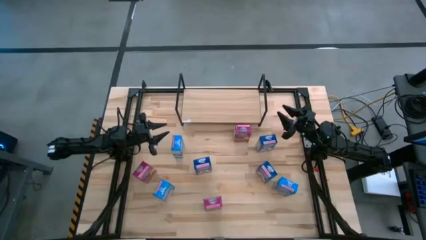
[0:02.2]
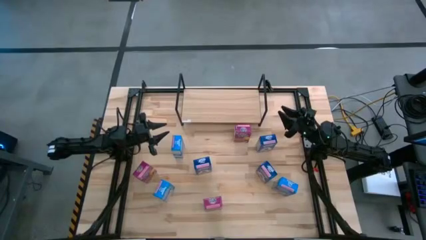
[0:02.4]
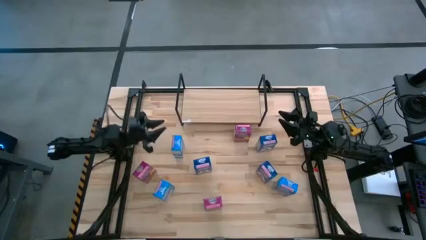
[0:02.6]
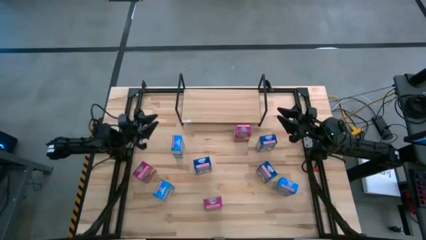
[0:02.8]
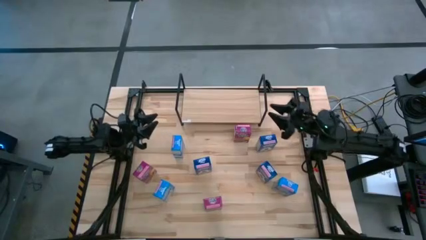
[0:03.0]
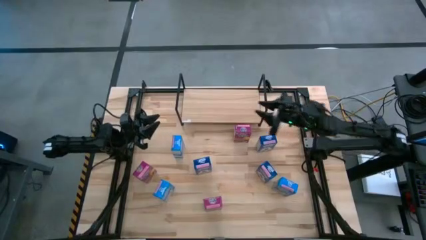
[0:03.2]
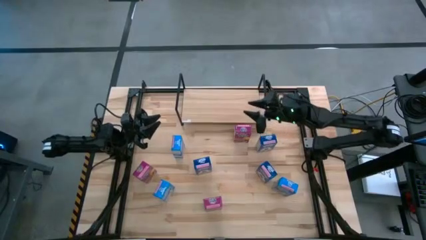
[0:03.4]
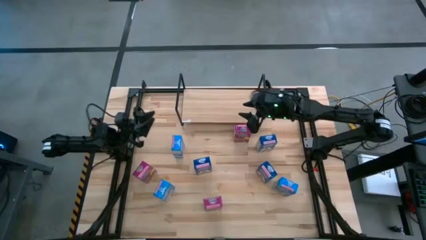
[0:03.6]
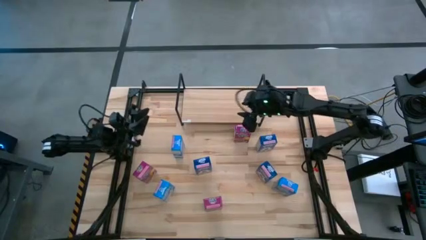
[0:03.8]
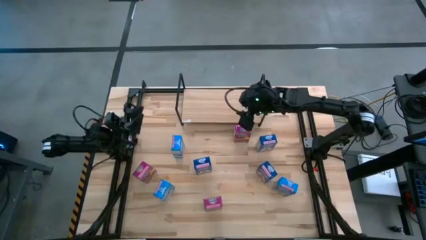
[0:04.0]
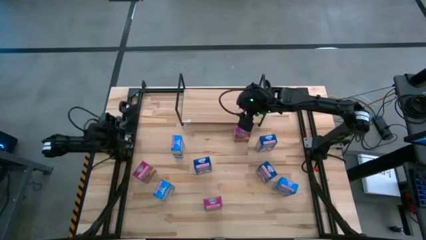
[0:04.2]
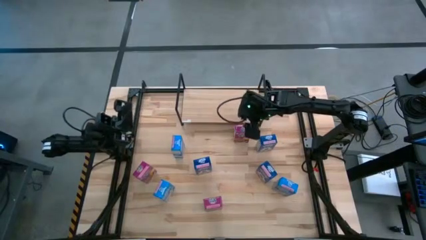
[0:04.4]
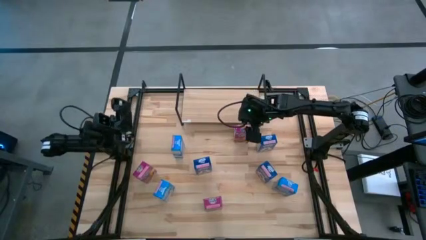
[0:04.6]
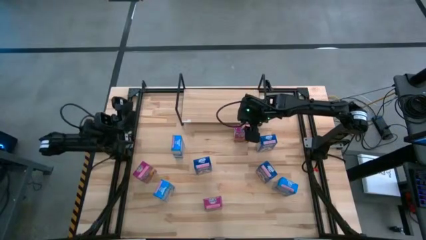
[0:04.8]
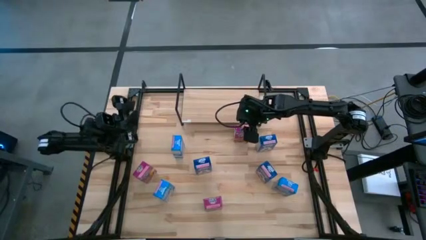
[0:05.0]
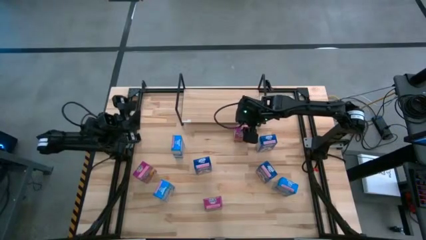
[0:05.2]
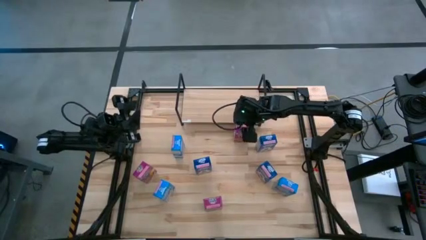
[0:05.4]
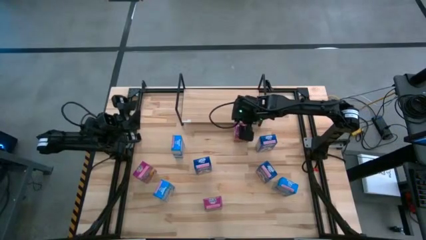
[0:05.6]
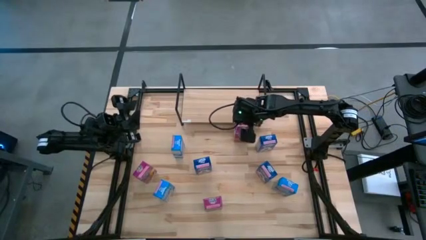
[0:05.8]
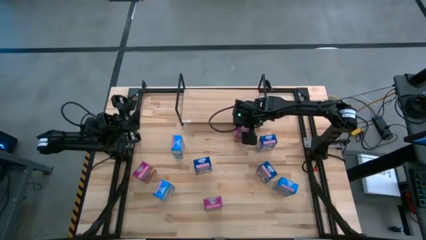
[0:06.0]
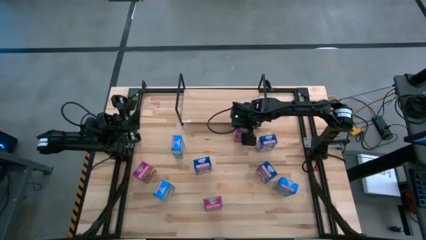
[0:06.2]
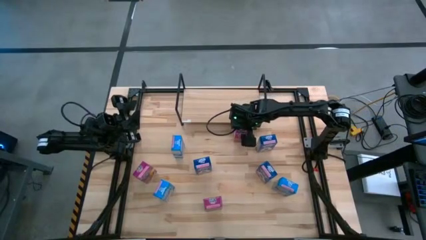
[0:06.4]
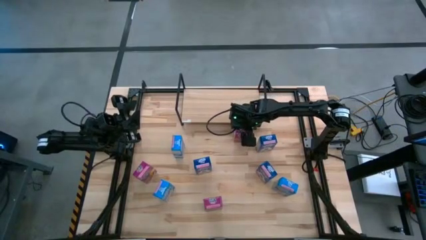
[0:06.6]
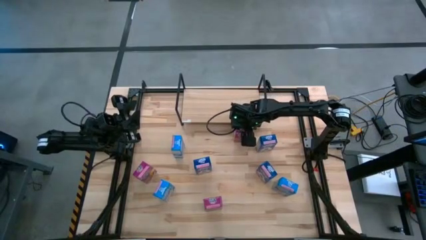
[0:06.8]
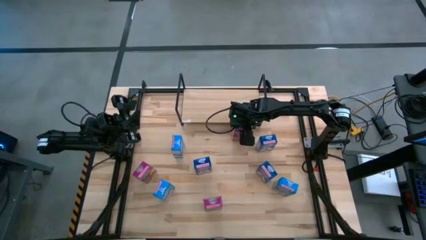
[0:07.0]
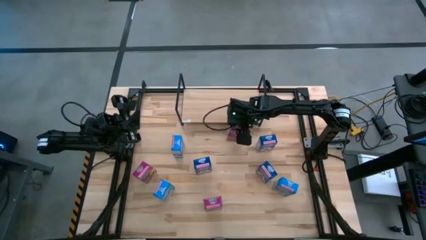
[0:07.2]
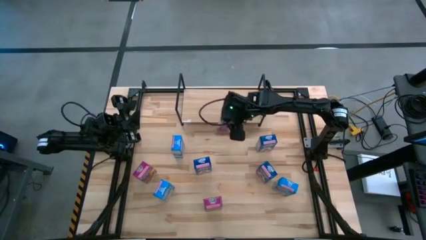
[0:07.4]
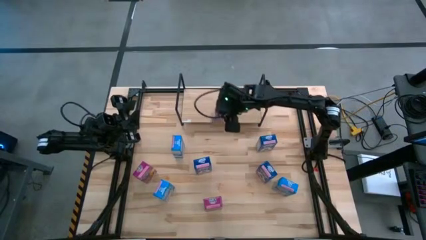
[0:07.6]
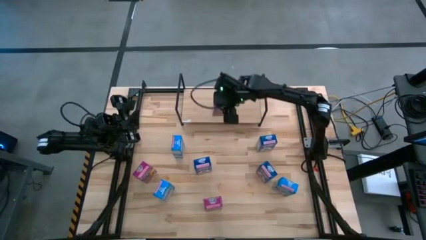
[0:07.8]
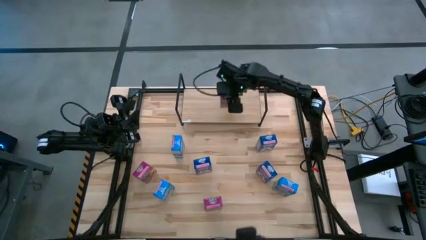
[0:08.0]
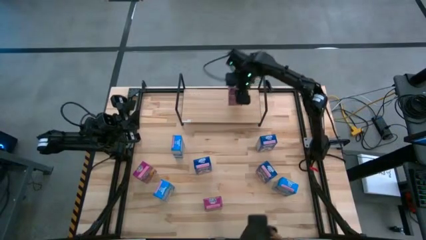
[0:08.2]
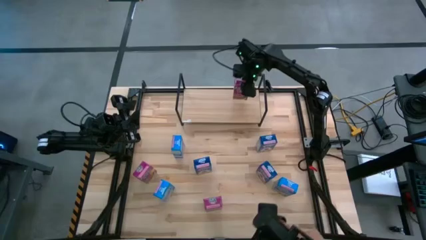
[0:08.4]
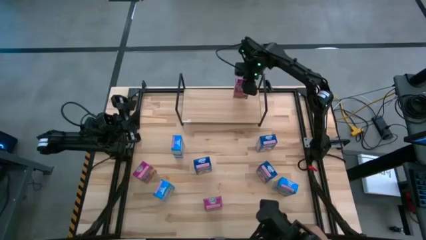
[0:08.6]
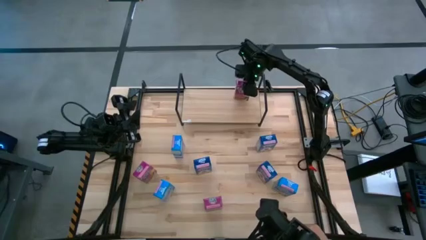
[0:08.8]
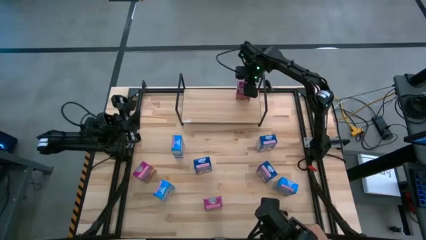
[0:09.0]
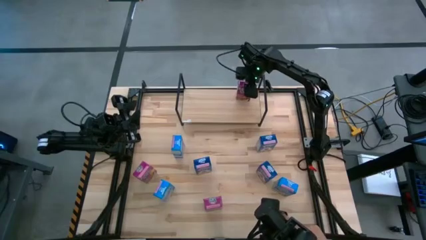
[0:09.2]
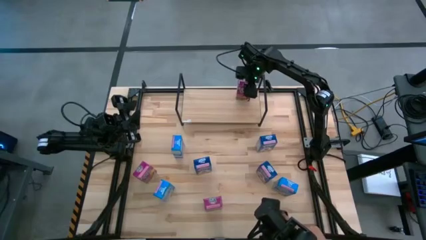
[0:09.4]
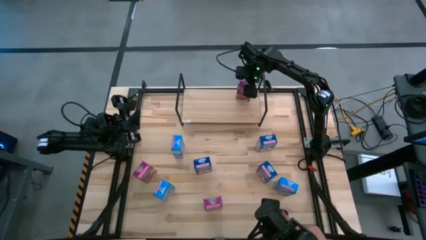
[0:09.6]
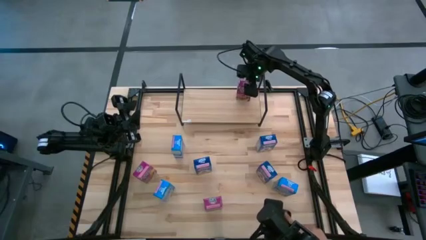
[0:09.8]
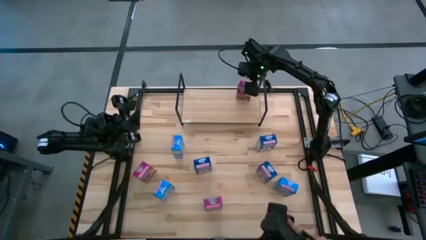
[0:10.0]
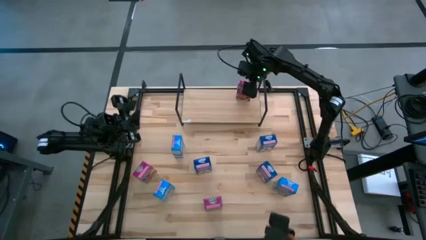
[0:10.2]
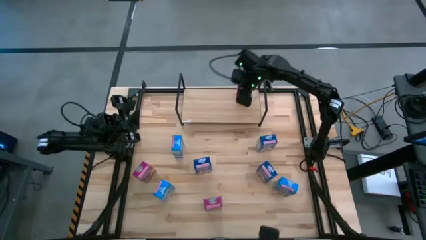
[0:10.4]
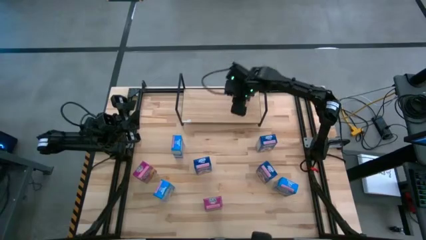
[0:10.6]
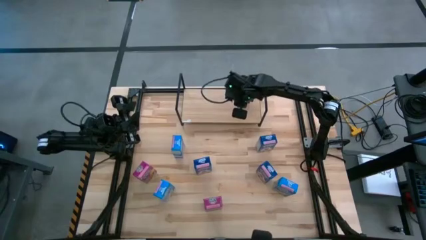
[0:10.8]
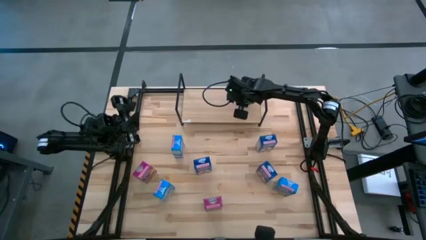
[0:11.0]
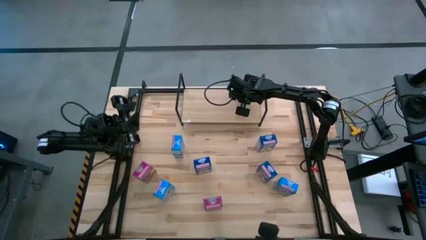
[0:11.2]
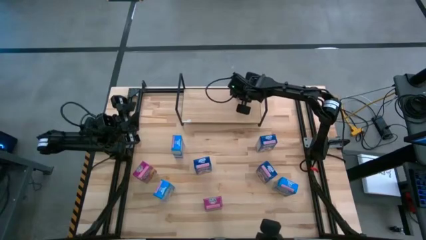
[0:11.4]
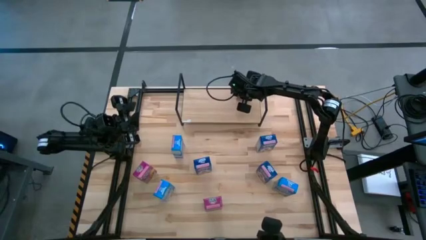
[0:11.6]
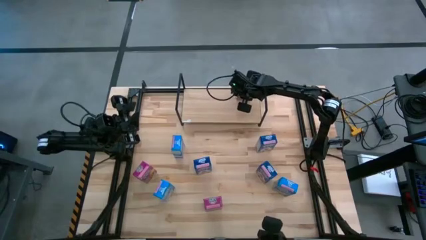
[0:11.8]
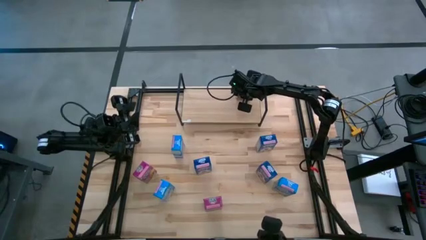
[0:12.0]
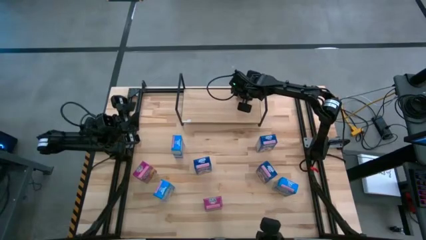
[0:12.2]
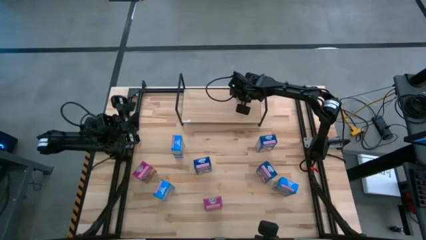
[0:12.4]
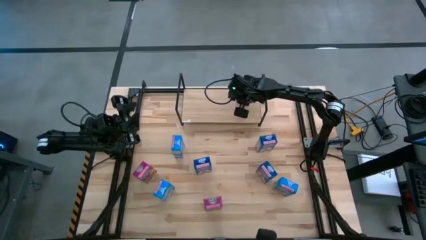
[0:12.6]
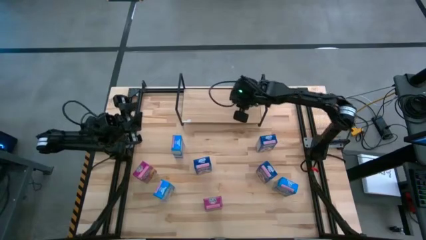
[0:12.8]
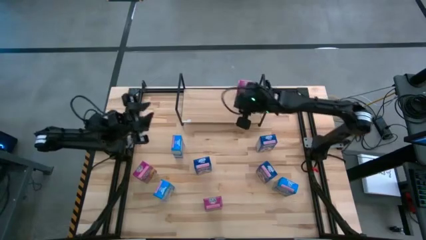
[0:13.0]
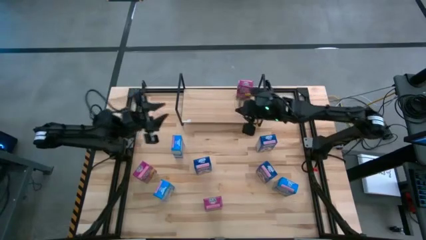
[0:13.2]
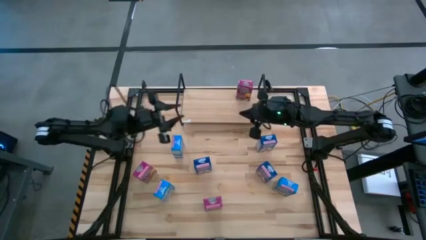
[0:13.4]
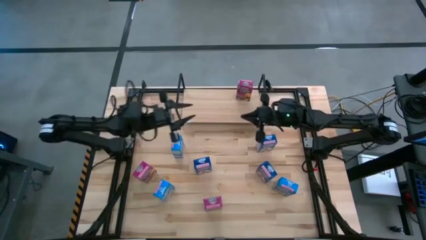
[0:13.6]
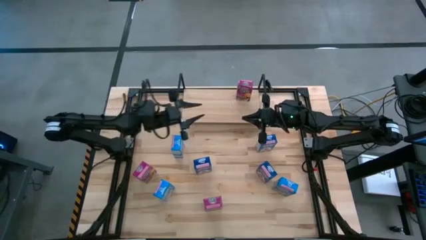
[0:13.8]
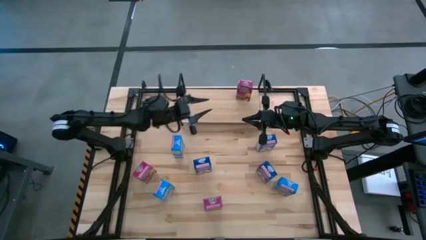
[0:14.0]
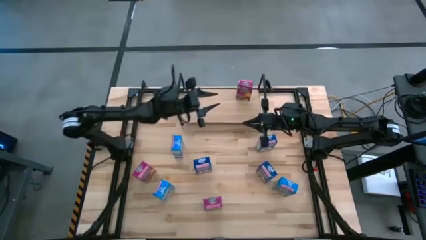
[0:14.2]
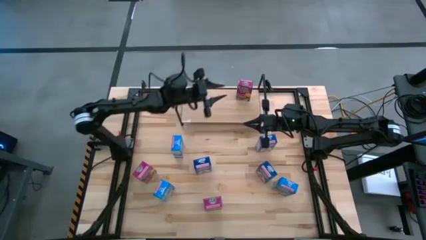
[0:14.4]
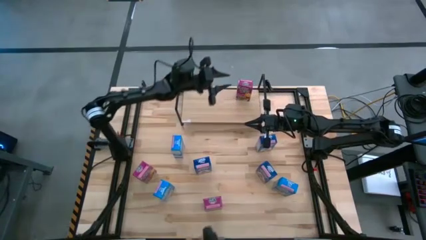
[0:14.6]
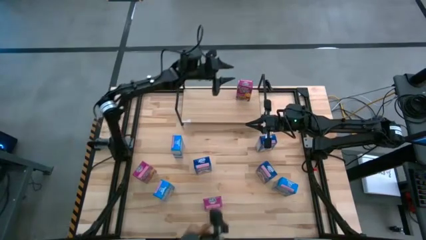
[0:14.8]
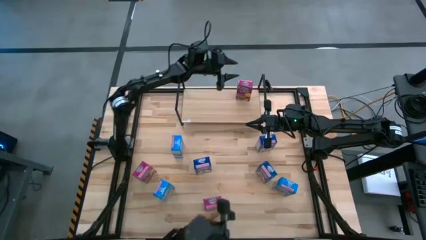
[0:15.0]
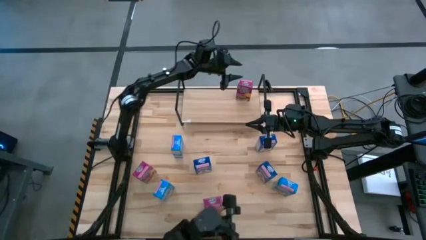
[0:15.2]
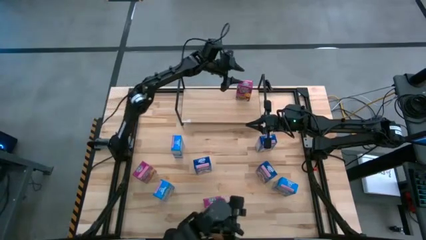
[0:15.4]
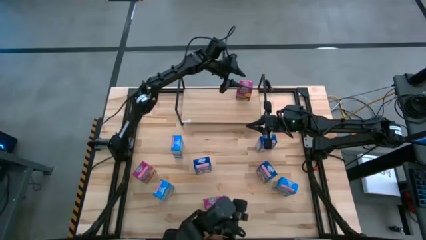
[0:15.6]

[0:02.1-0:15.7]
Task: Stack cereal on shelf
Put the top purple cereal box on the shelf Adjust the purple cereal box on the shelf

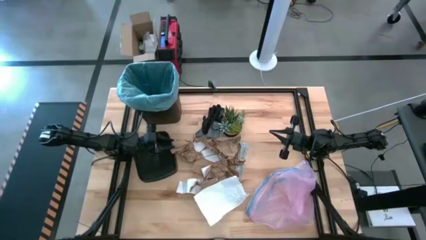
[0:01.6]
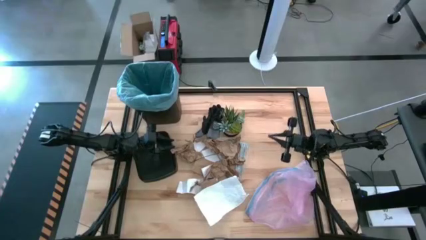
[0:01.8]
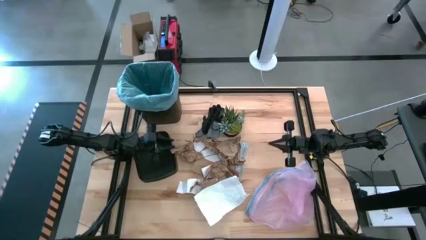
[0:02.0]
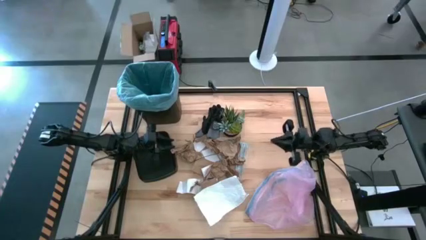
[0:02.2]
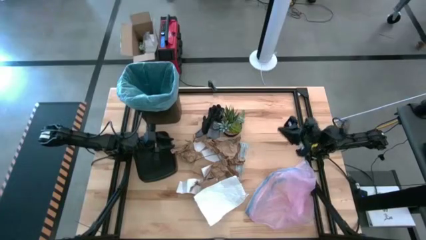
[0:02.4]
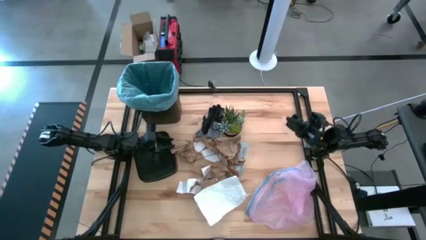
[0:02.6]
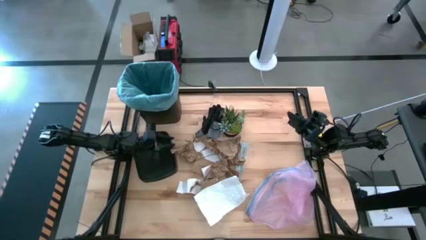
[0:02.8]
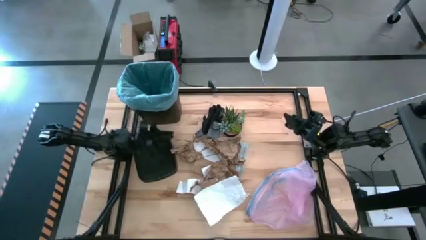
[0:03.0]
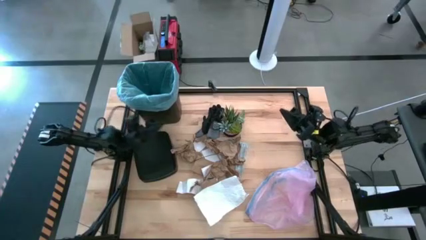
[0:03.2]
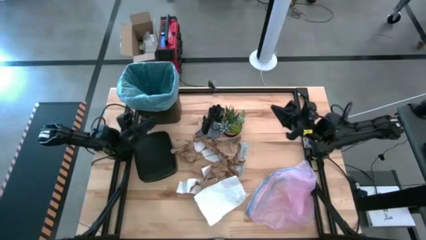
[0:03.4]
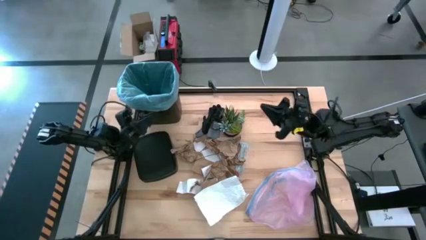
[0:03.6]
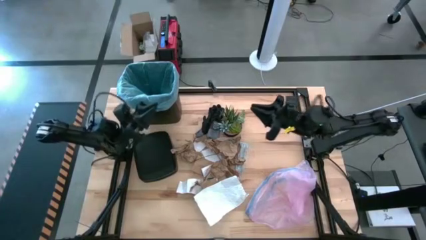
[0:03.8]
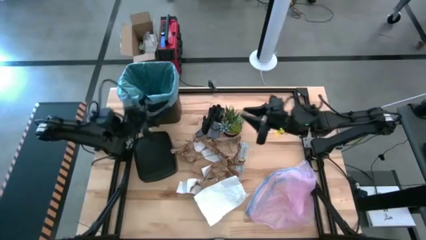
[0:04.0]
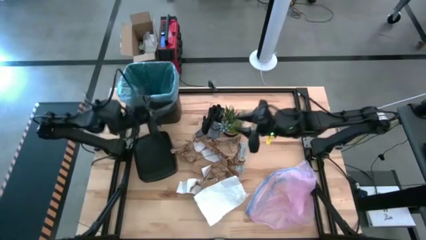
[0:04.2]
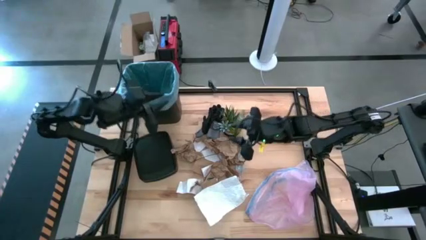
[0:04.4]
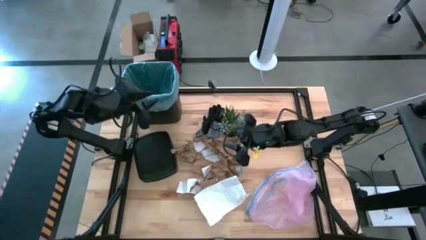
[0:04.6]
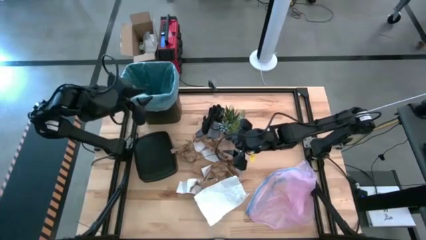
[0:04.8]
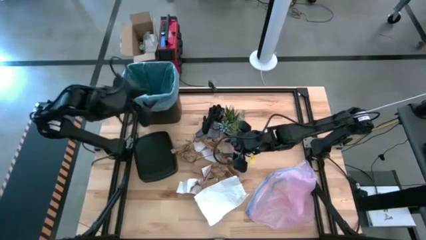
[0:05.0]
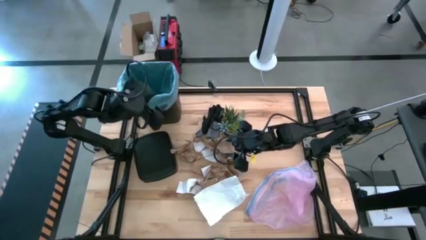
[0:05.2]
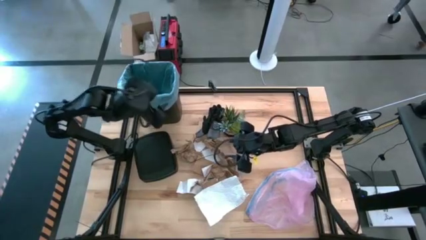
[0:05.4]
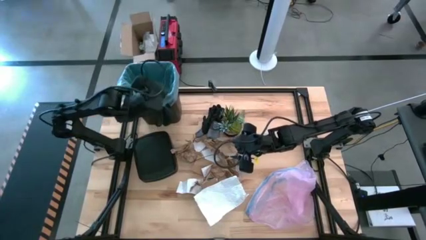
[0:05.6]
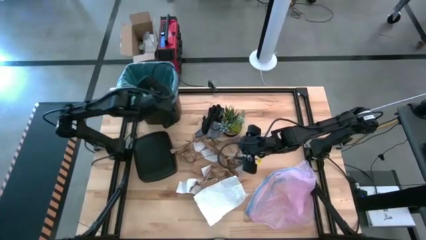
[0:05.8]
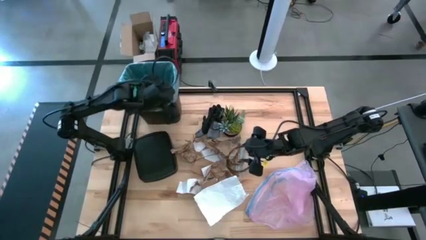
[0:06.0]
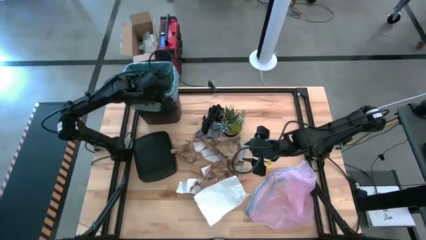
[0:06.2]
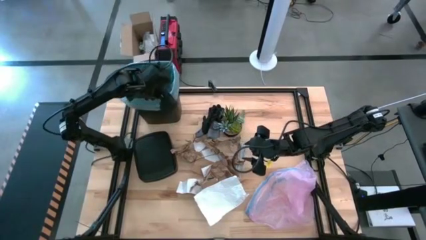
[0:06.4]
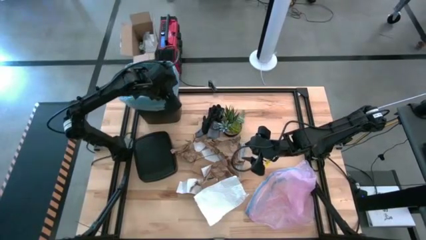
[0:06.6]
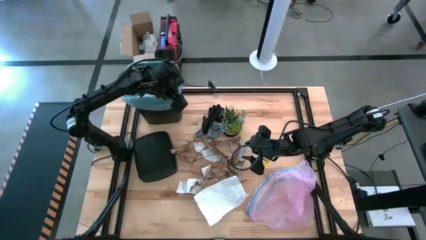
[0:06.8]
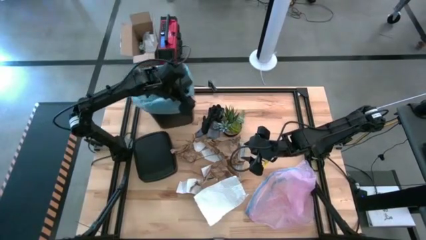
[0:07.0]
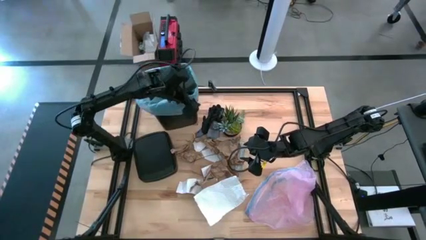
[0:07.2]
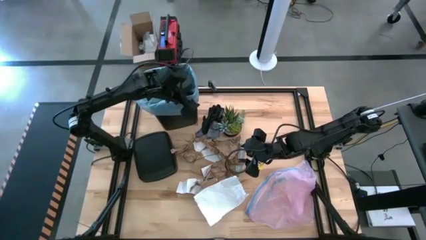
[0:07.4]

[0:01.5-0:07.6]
Task: place trash/remove bag and relplace
Prepare the trash bin
